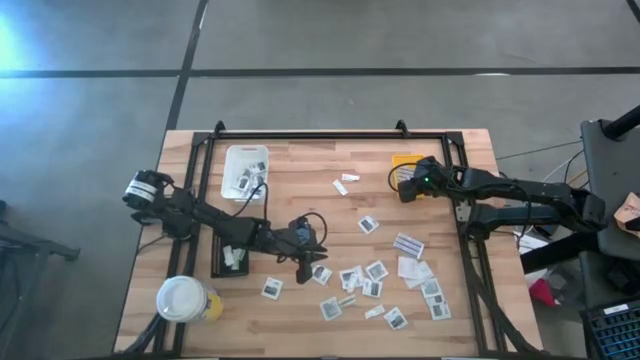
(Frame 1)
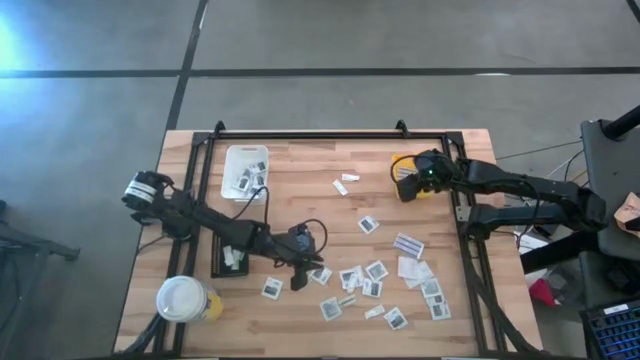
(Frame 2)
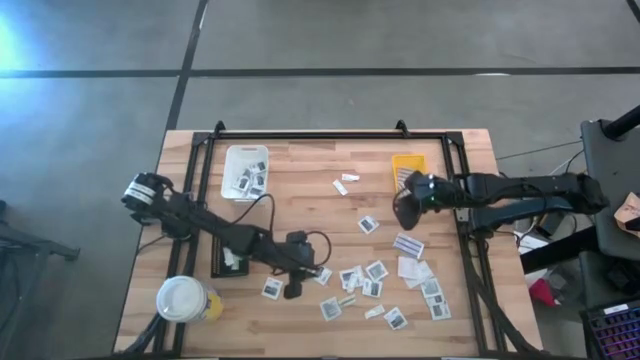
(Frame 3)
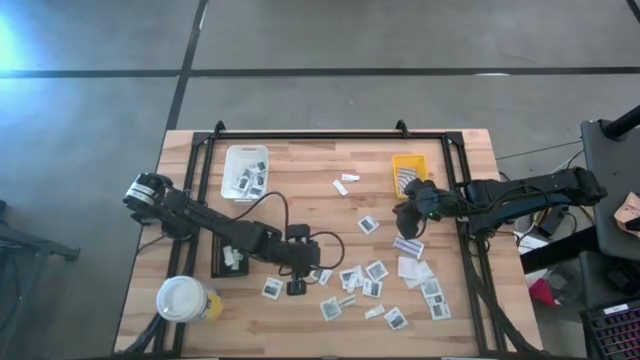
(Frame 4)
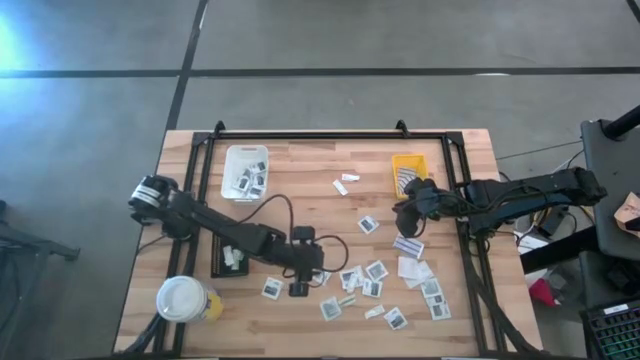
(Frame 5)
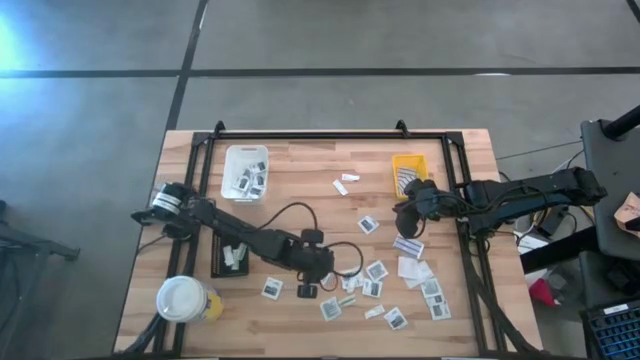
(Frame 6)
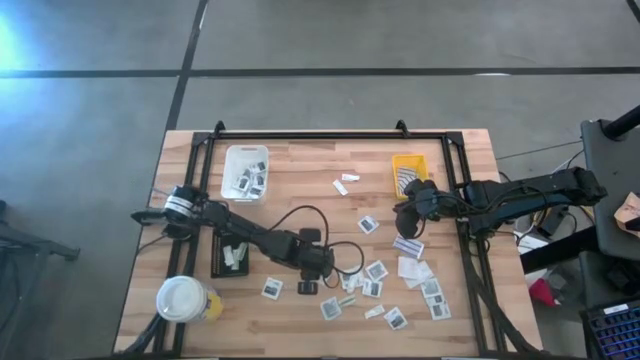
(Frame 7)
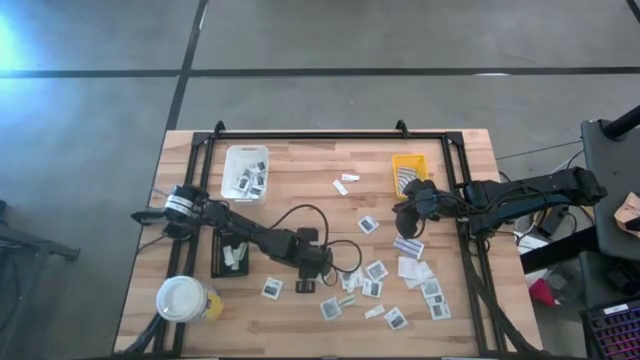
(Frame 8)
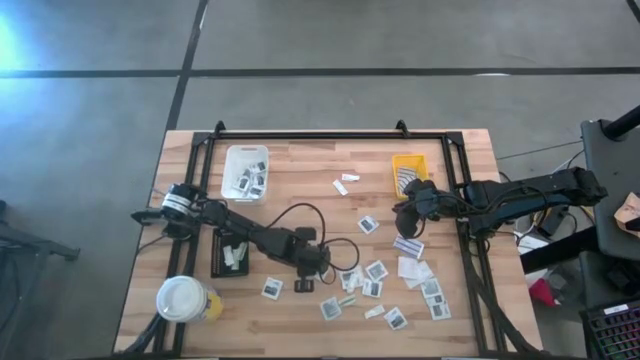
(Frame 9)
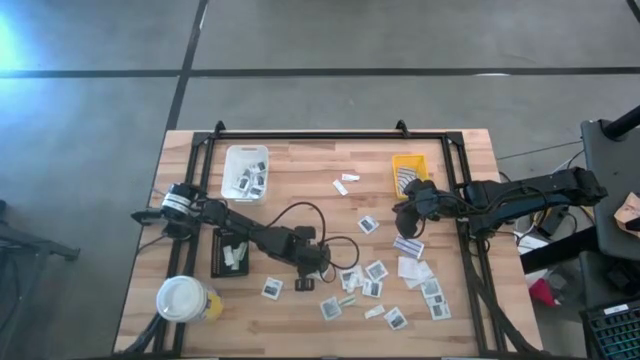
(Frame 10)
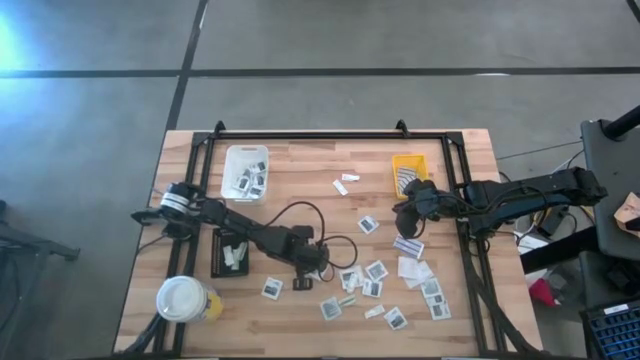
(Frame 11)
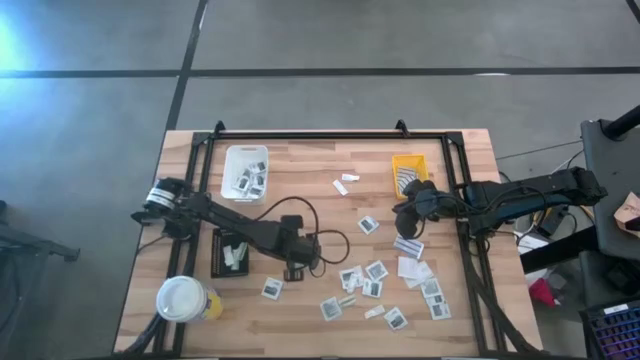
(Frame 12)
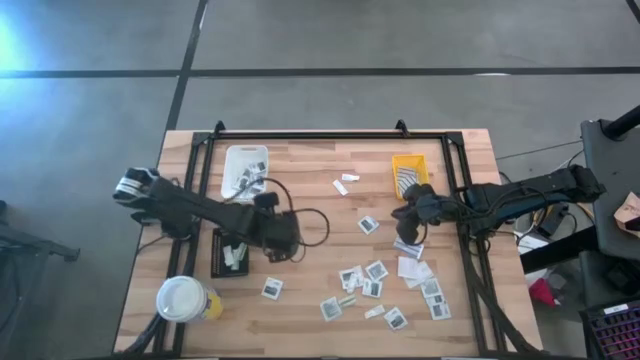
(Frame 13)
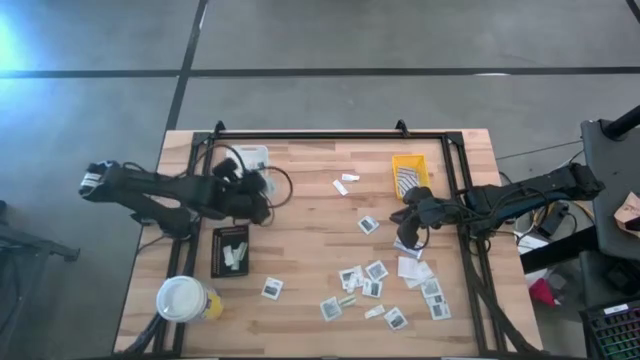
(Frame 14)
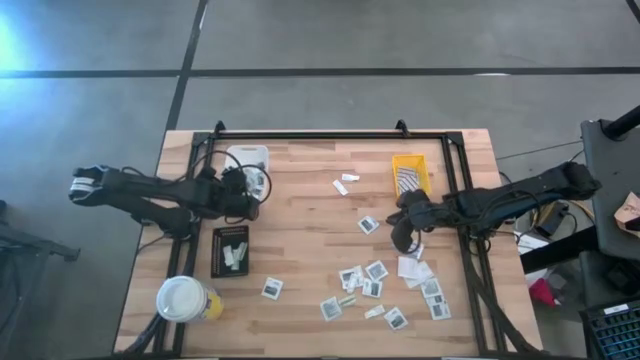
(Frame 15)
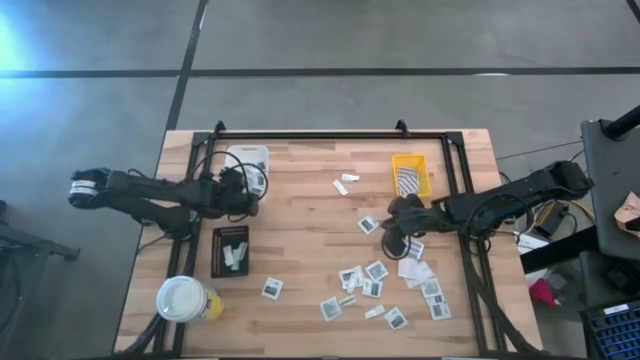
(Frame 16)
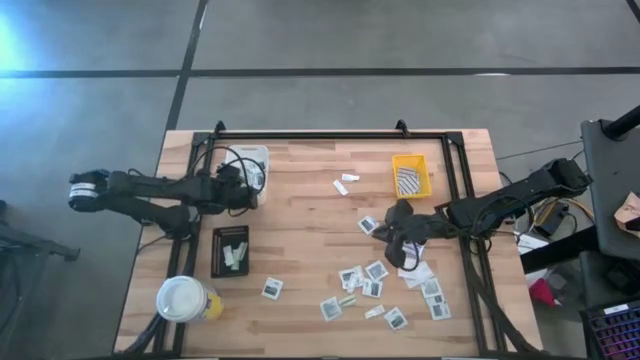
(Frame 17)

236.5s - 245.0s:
Task: Pick & Place First Aid Supplies
Put the gray towelette pack into the white bin

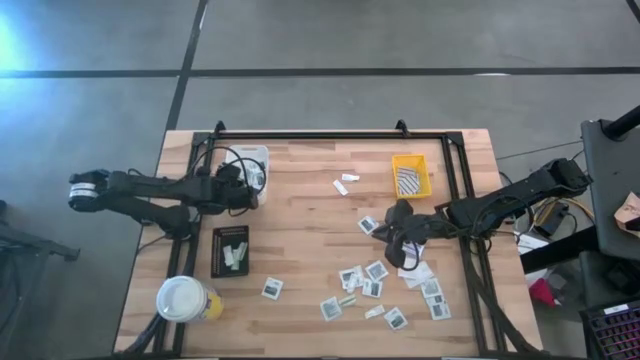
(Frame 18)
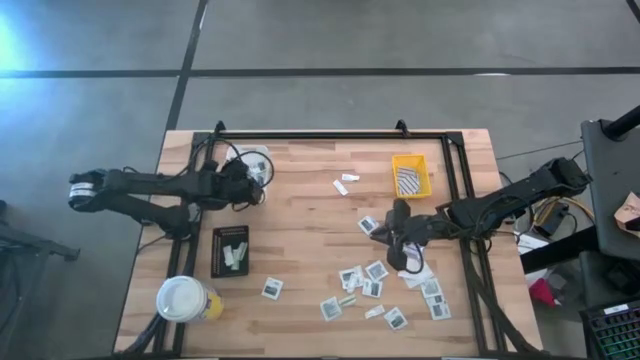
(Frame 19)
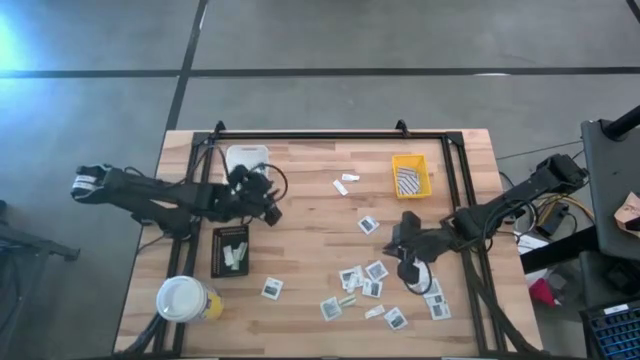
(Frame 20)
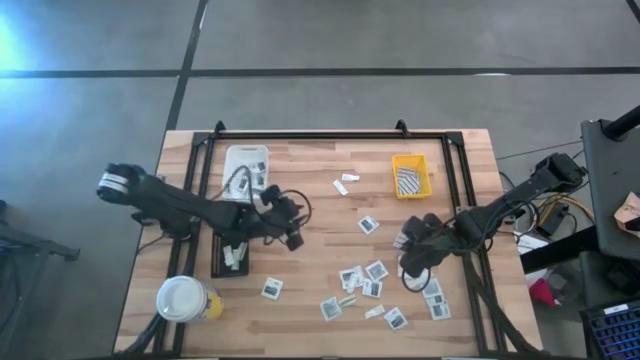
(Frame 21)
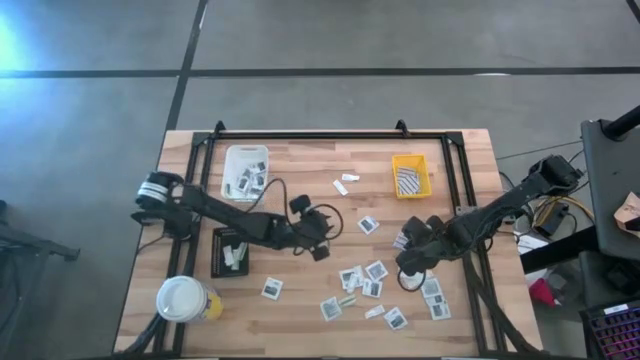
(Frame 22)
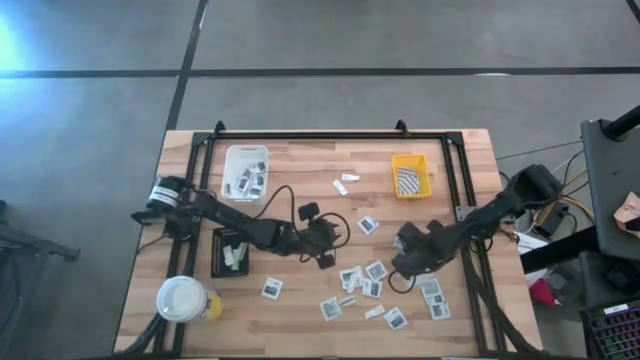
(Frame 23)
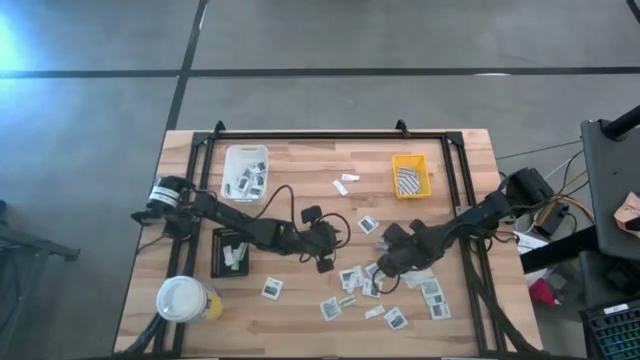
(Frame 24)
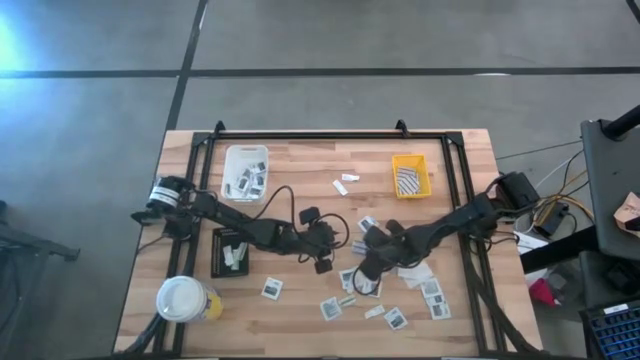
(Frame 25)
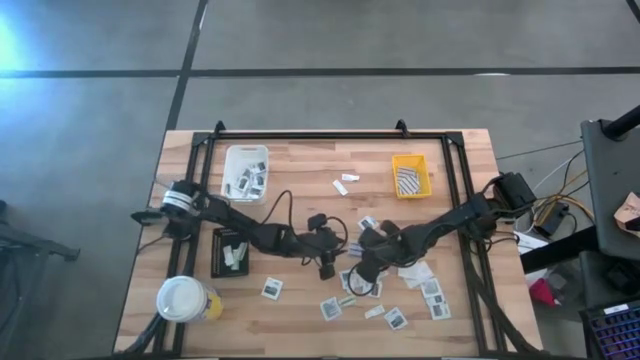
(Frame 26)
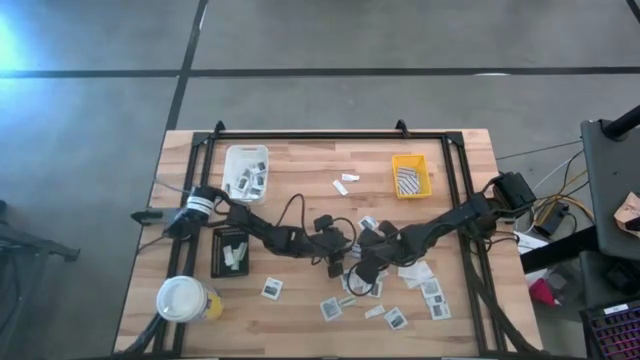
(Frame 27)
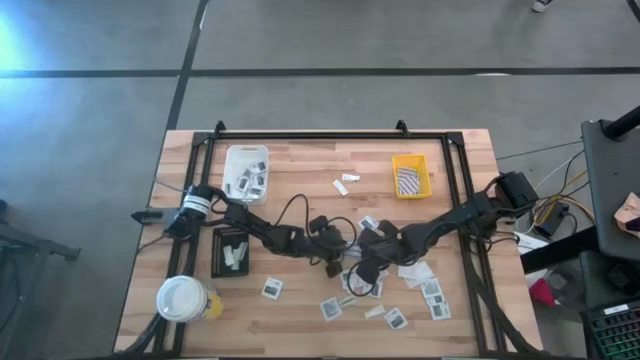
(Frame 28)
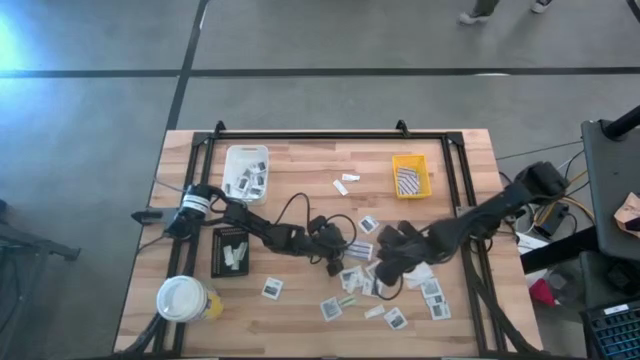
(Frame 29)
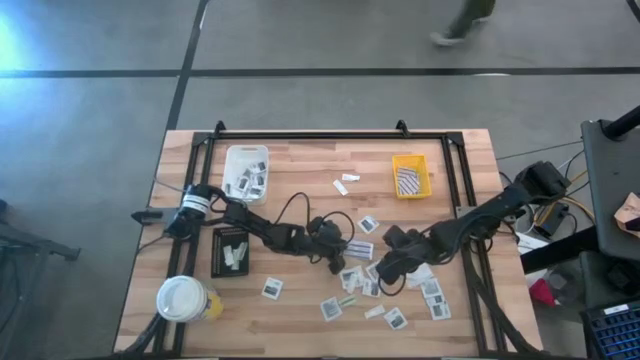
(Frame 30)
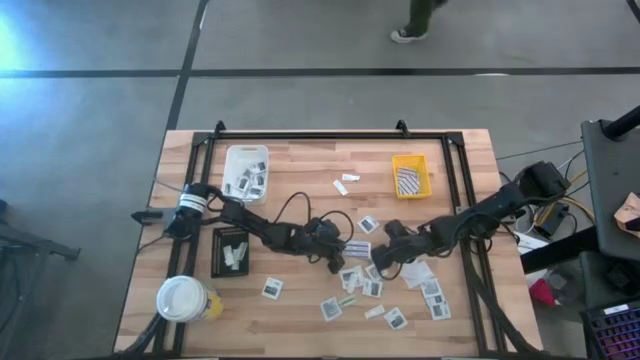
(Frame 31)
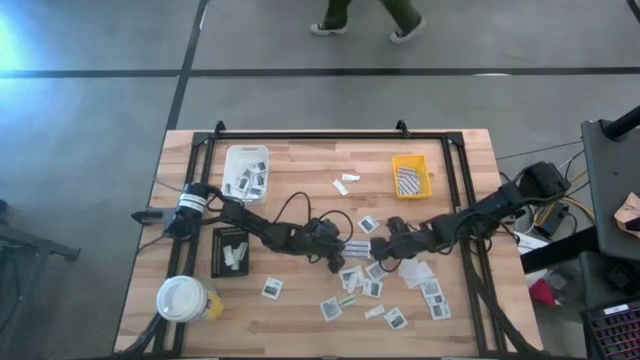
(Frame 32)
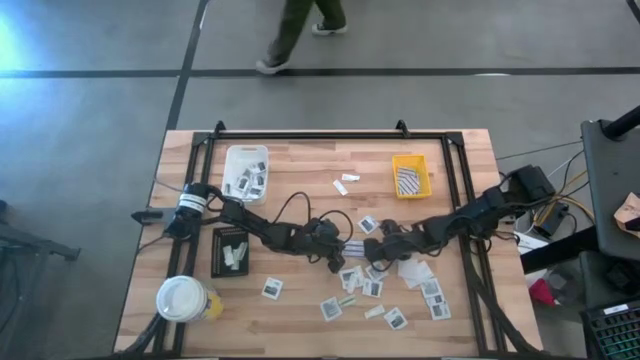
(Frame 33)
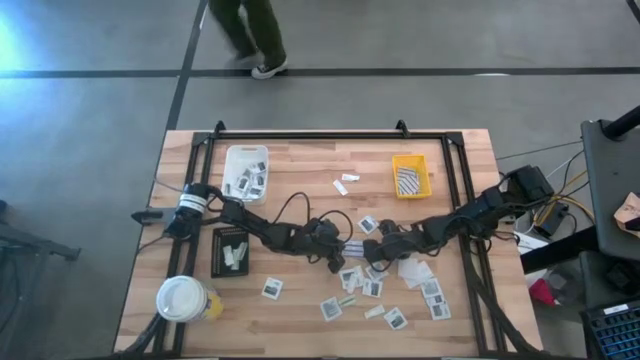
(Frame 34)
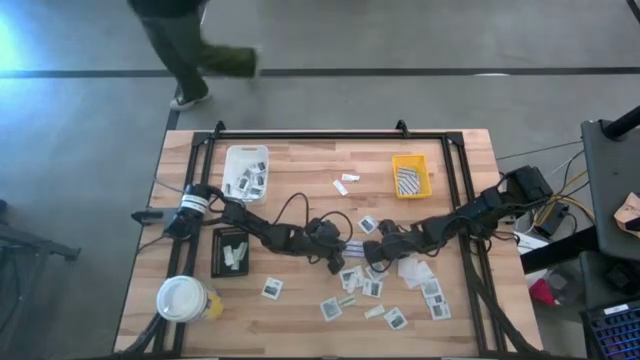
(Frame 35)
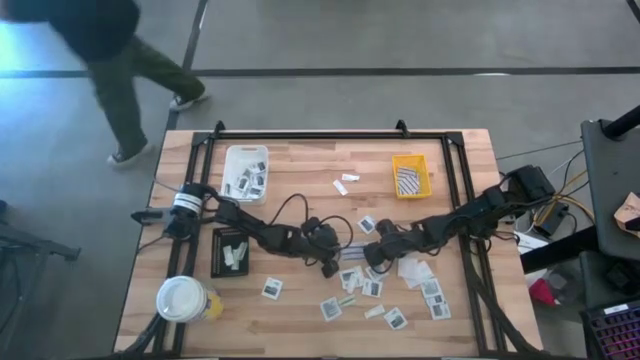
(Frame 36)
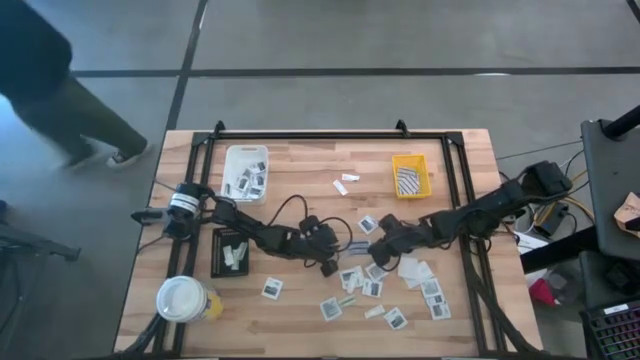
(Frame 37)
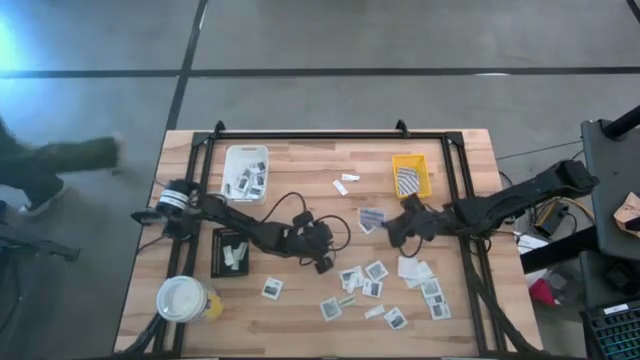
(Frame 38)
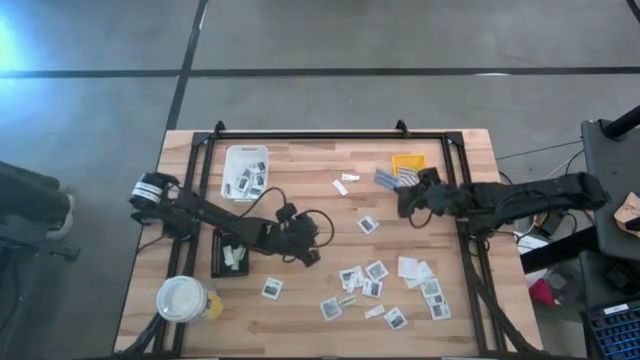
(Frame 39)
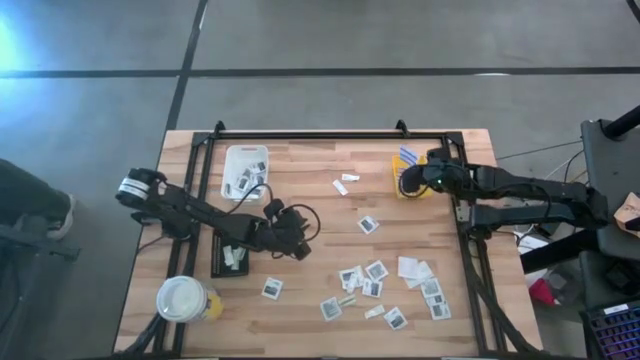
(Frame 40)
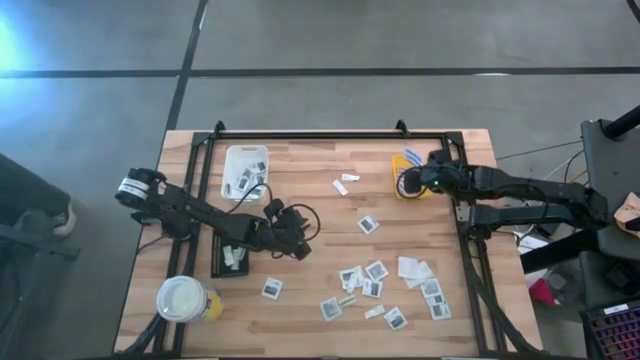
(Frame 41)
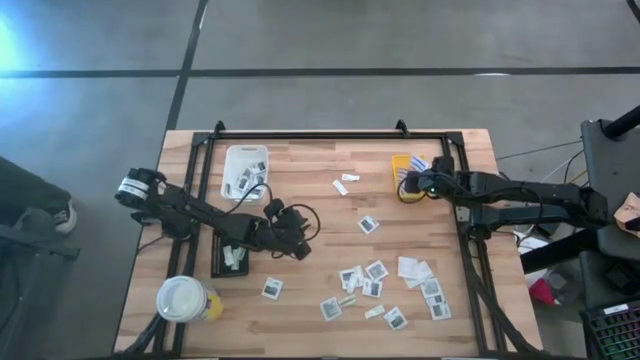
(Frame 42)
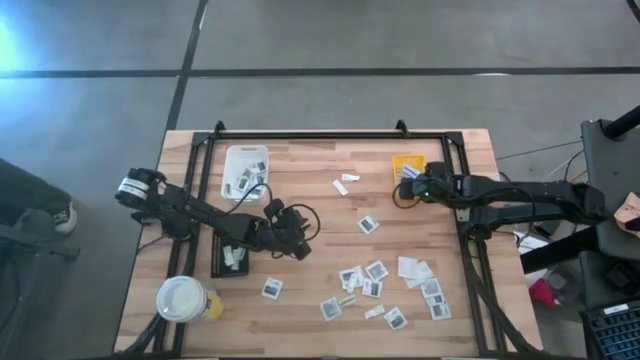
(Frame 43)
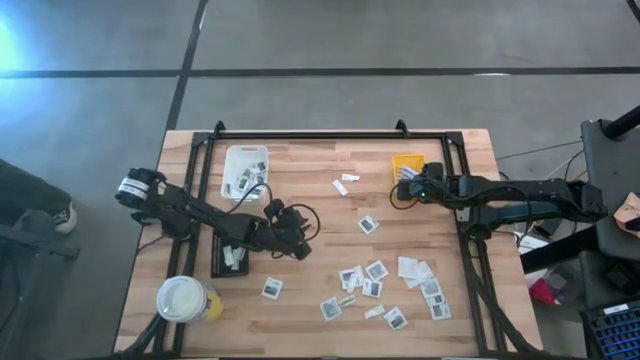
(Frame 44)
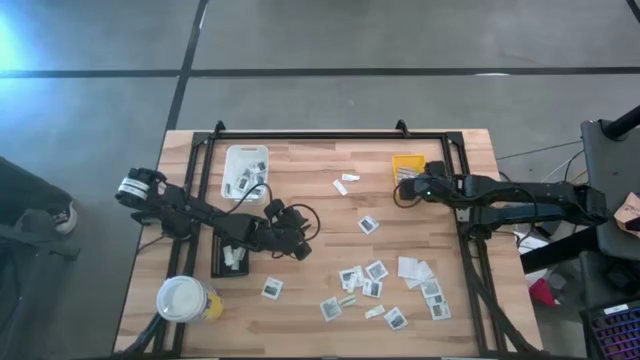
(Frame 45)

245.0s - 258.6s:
Put the blue bandage pack into the yellow bin
